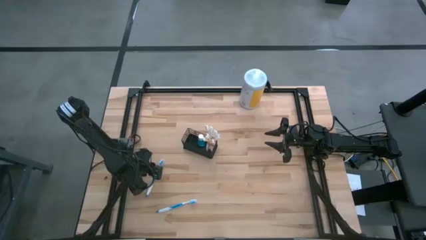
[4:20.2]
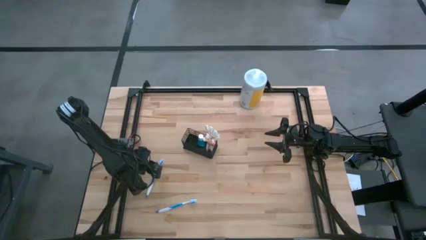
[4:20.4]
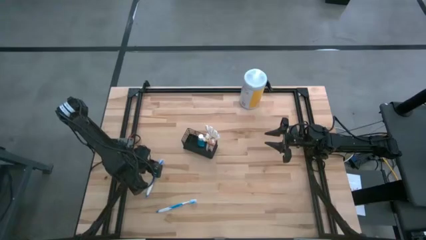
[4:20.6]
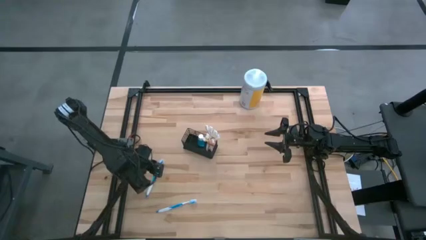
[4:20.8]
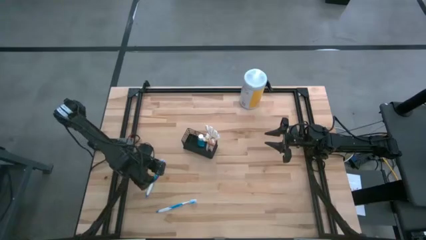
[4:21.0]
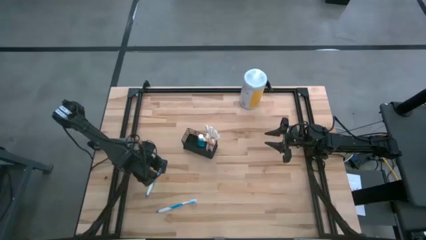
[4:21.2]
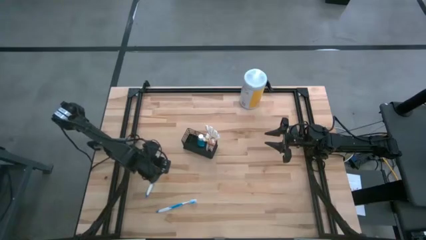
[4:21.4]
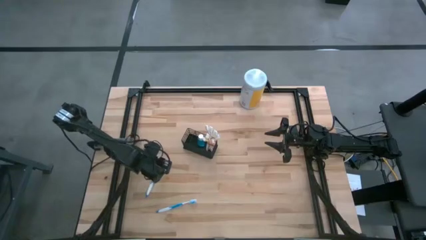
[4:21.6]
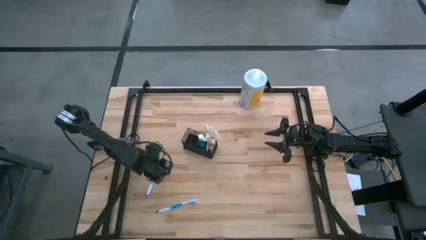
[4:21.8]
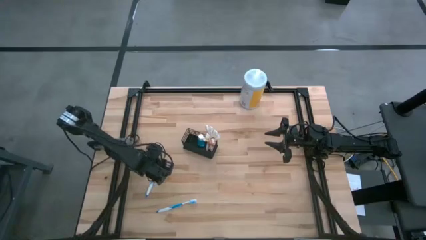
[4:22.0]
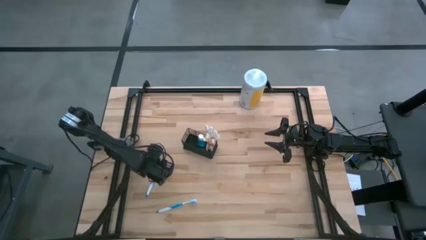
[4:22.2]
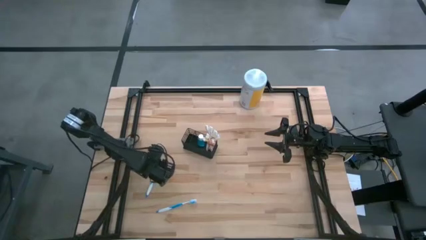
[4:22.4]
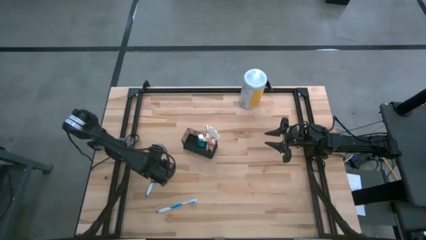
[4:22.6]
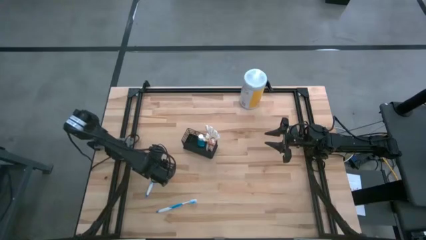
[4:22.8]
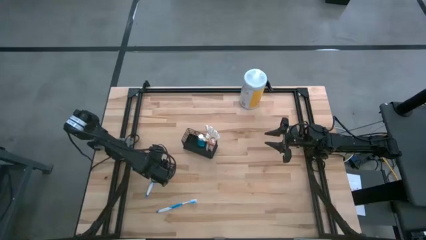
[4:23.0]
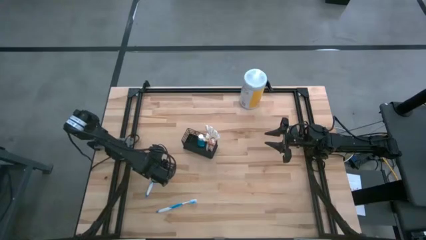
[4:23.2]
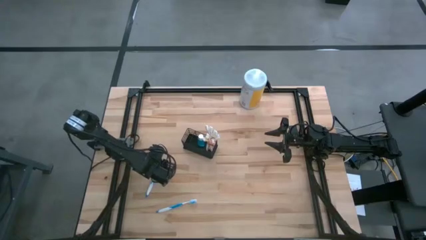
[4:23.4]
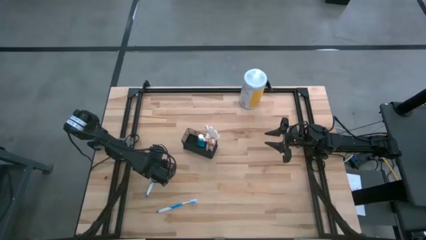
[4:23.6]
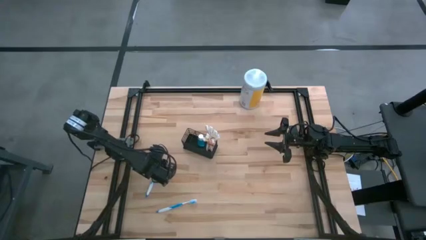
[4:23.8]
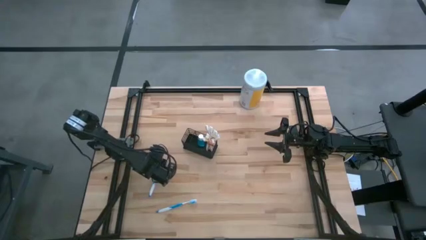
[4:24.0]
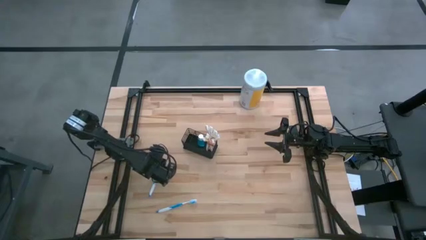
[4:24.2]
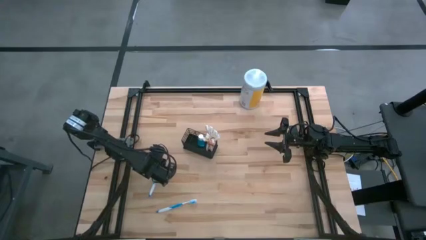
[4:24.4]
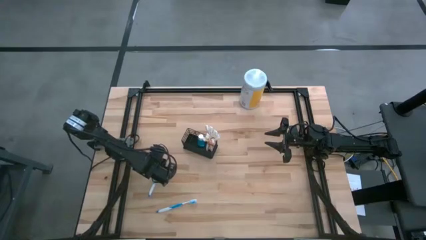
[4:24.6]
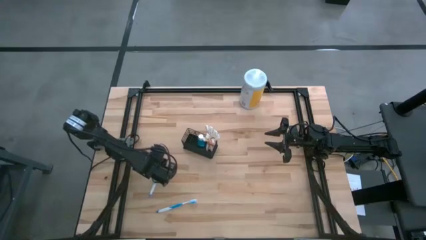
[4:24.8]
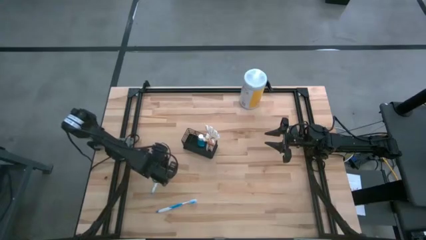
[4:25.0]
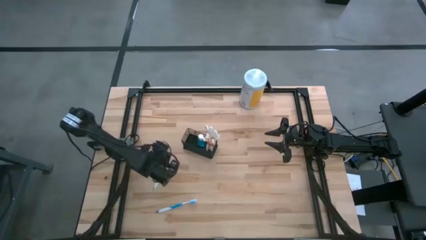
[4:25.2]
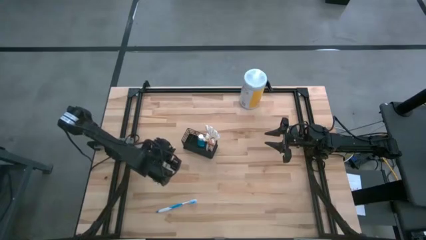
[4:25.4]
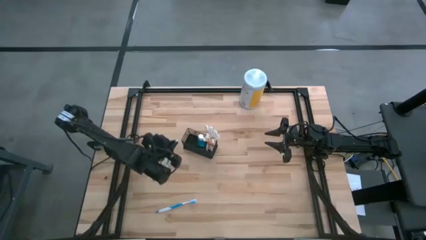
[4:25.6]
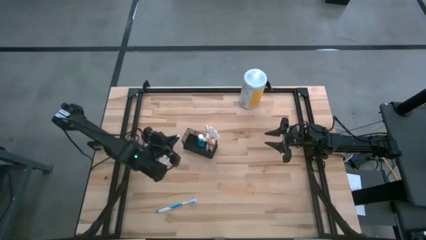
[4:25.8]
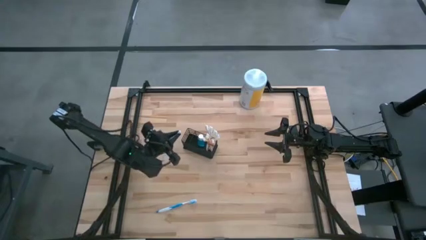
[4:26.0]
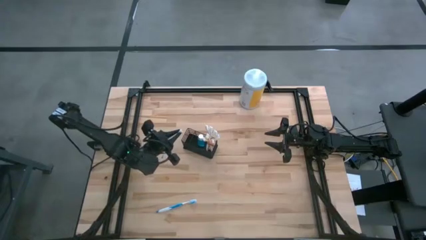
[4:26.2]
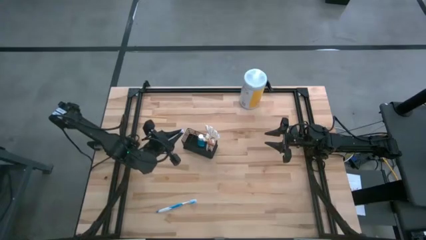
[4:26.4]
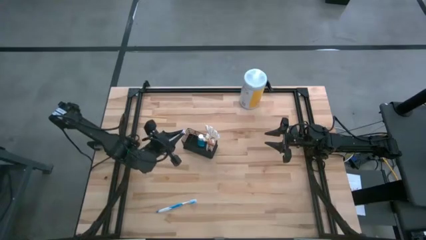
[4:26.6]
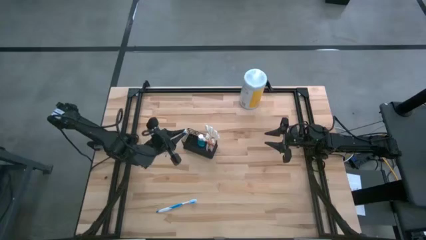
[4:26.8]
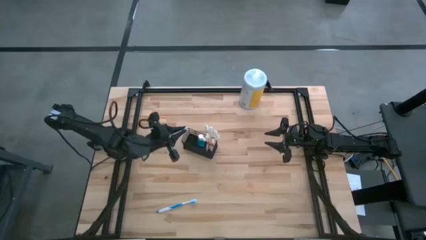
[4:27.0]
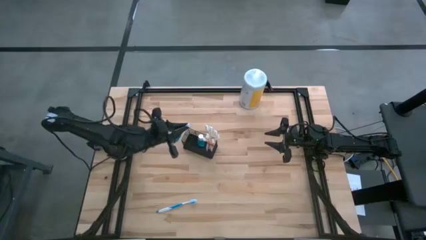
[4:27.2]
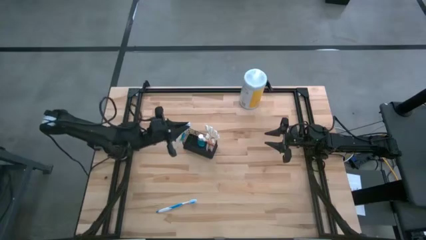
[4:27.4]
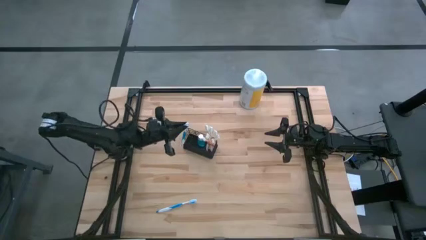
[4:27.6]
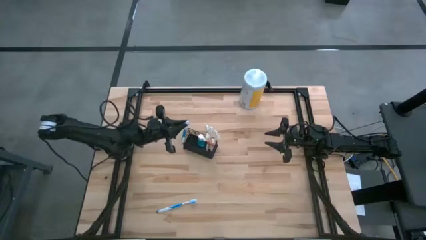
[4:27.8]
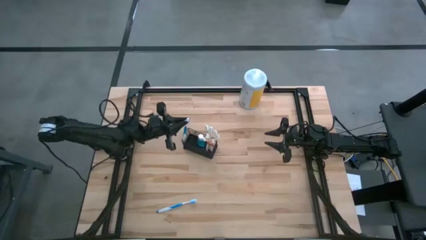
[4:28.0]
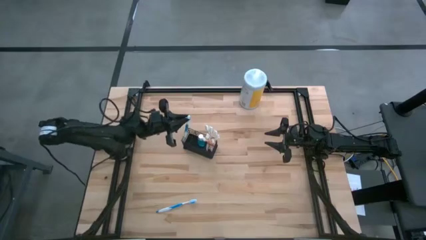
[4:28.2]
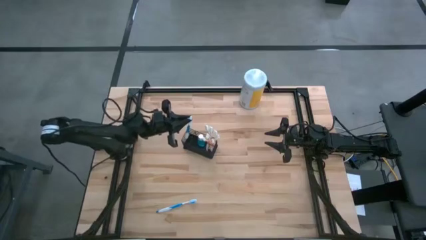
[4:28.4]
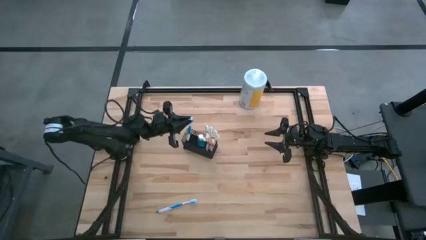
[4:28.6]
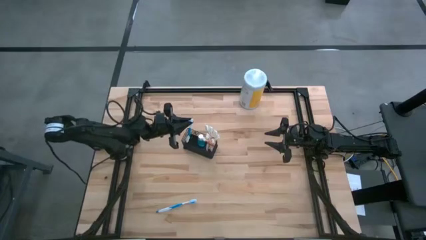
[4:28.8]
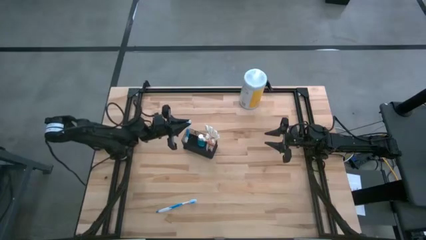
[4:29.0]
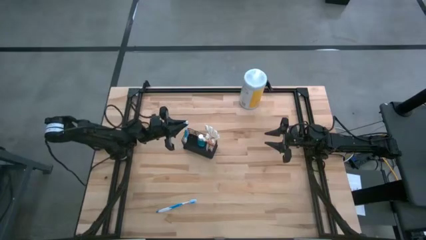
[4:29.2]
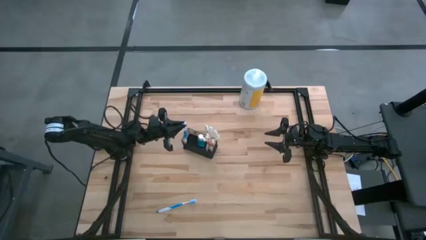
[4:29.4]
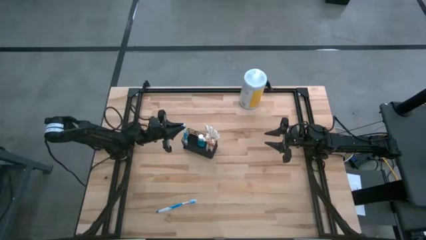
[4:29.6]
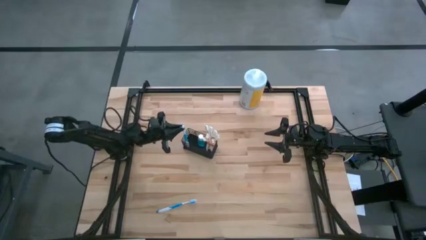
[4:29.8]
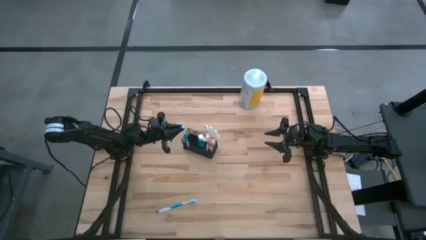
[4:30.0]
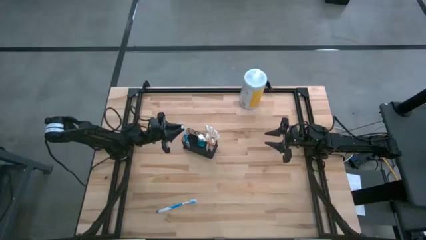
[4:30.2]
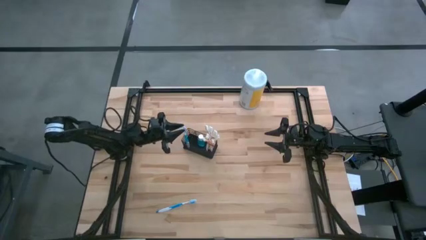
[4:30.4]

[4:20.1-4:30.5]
Task: Pick & Place toothbrushing station
Put the blue toothbrush into the left section of the wire organizer

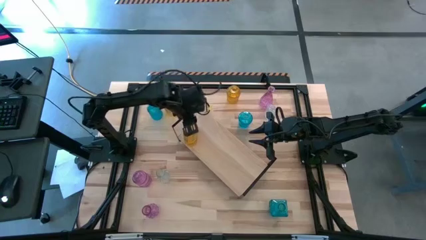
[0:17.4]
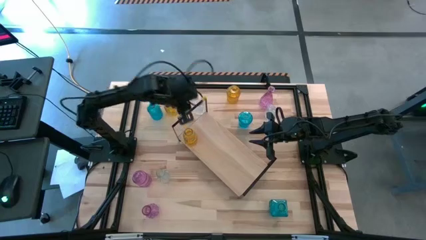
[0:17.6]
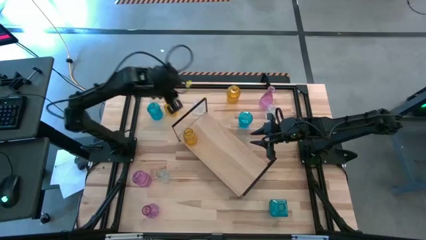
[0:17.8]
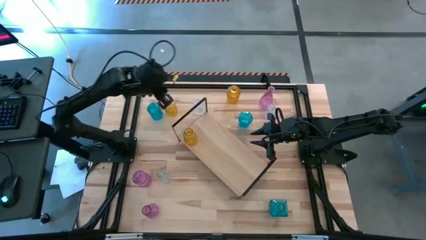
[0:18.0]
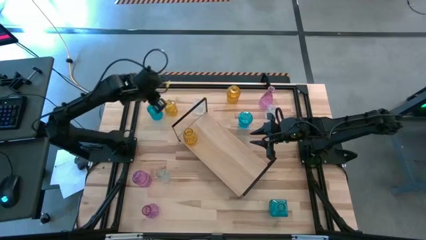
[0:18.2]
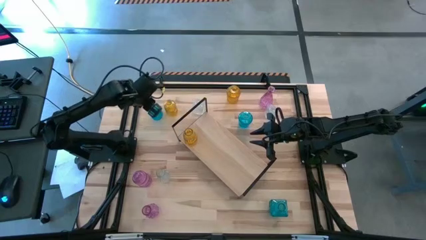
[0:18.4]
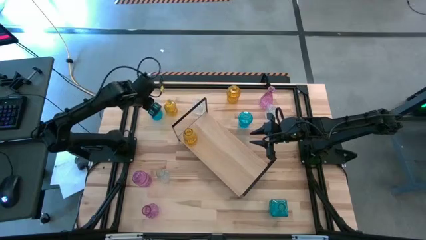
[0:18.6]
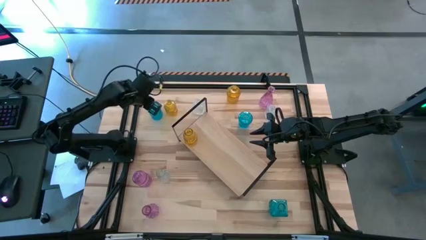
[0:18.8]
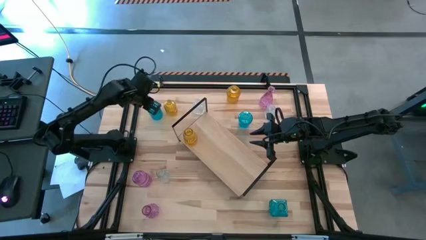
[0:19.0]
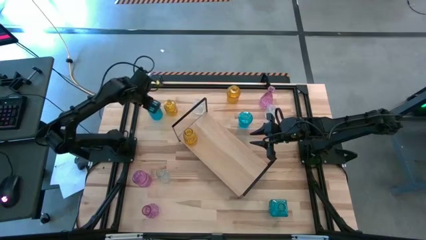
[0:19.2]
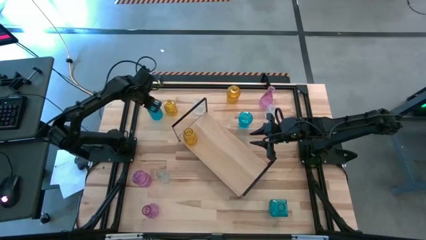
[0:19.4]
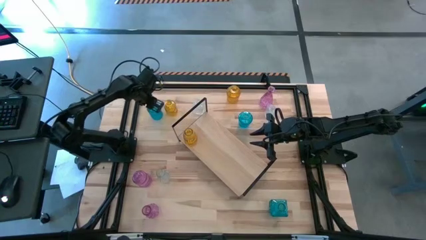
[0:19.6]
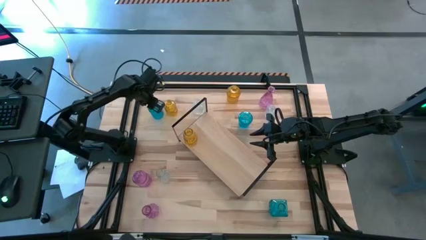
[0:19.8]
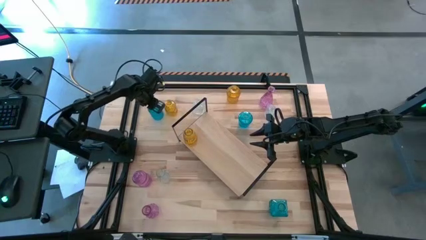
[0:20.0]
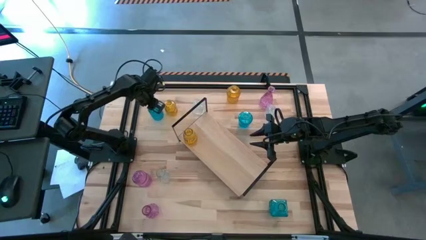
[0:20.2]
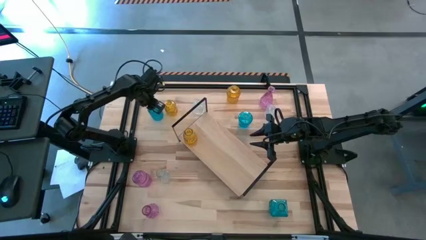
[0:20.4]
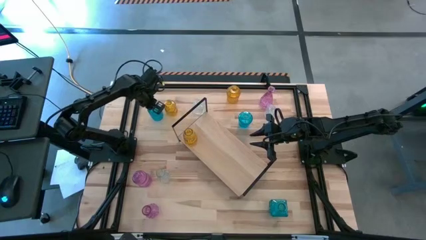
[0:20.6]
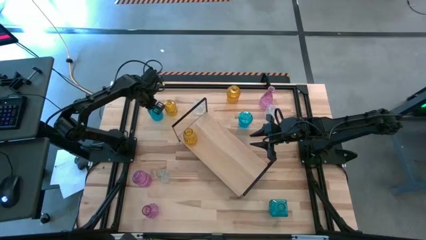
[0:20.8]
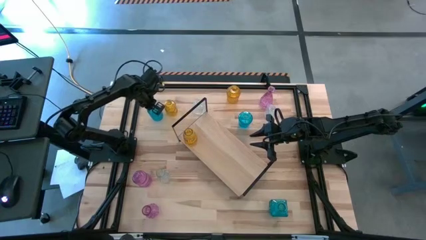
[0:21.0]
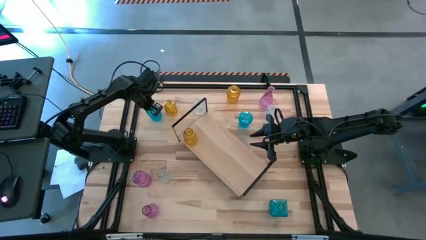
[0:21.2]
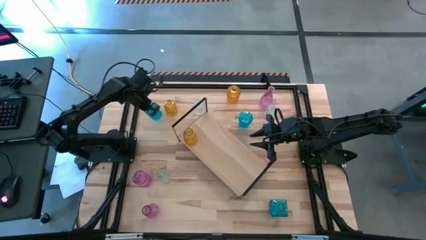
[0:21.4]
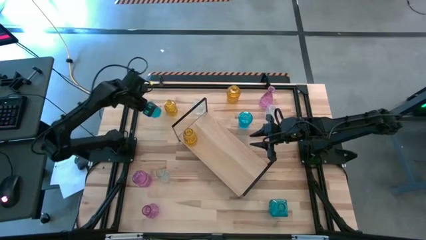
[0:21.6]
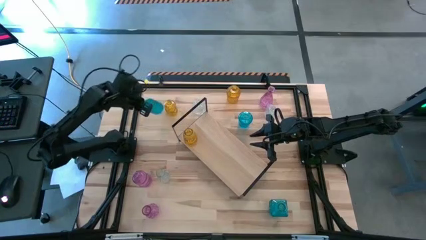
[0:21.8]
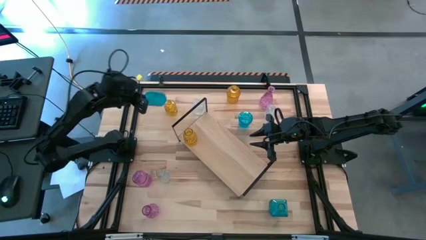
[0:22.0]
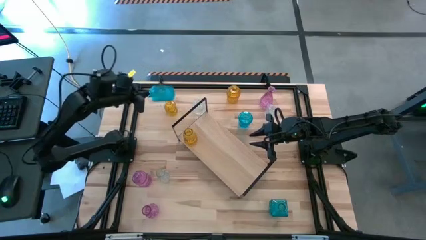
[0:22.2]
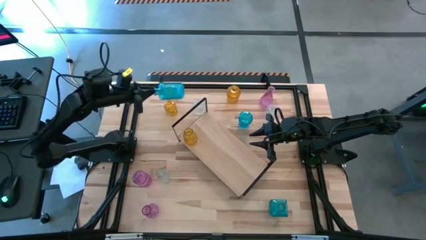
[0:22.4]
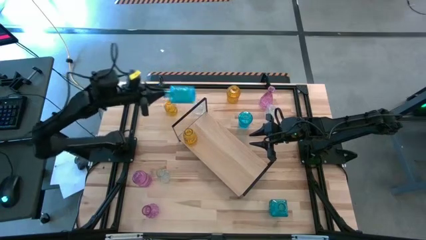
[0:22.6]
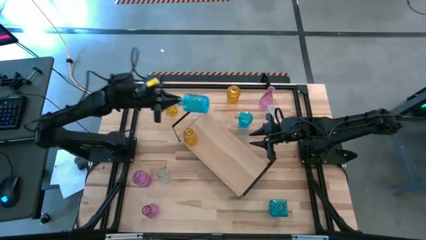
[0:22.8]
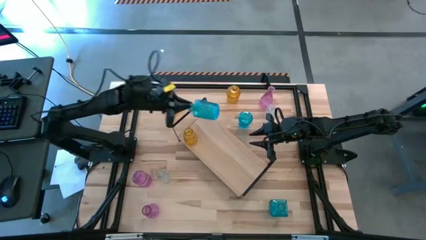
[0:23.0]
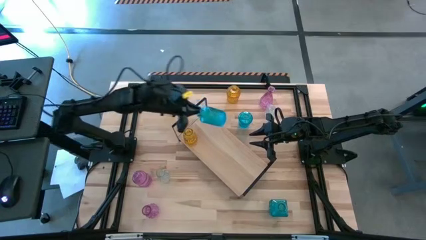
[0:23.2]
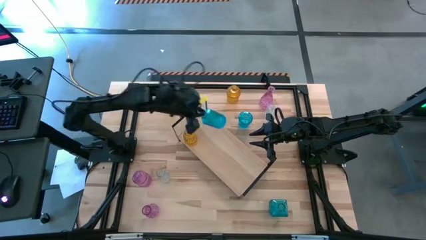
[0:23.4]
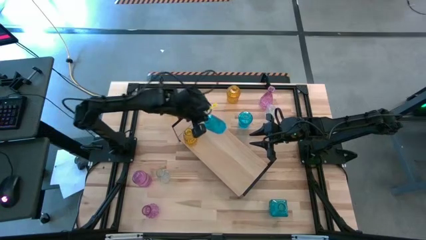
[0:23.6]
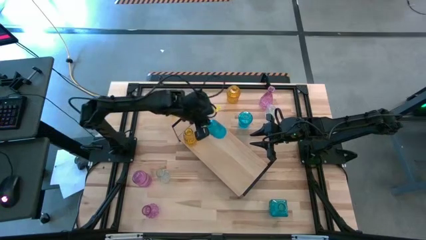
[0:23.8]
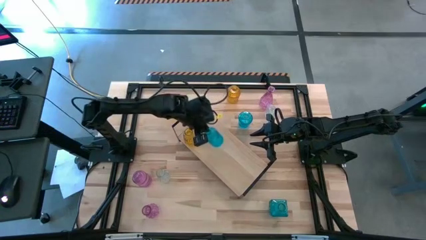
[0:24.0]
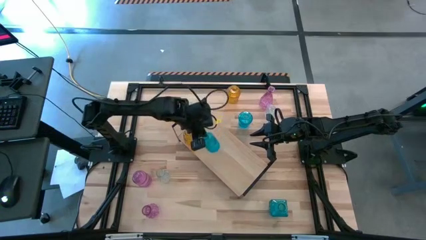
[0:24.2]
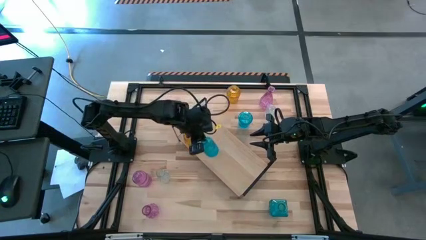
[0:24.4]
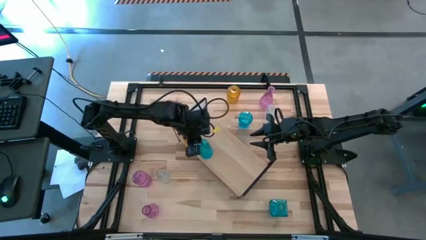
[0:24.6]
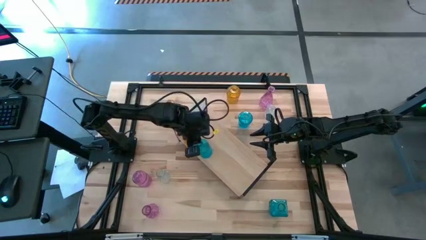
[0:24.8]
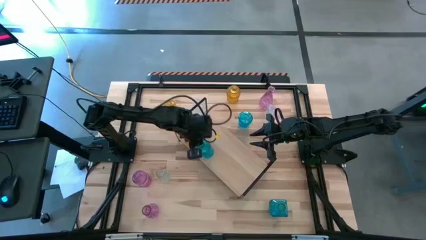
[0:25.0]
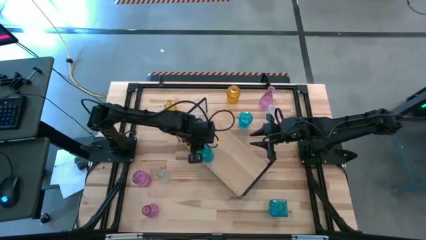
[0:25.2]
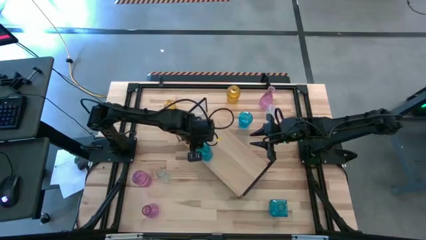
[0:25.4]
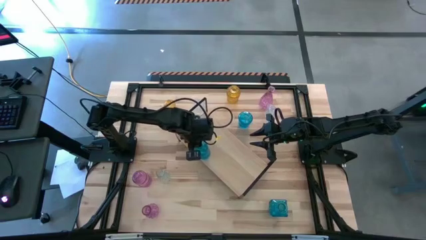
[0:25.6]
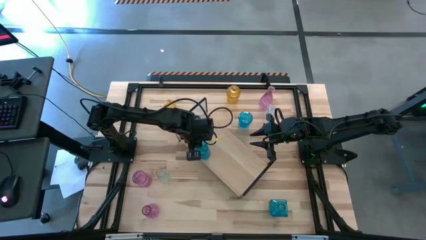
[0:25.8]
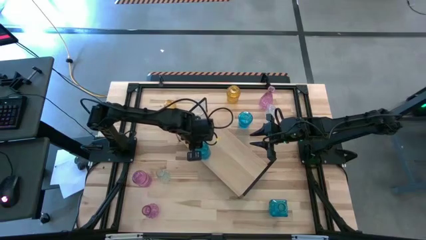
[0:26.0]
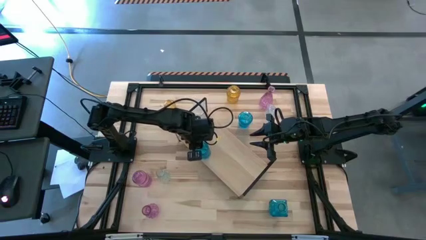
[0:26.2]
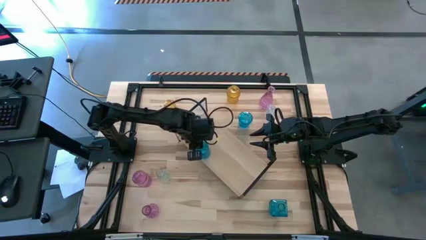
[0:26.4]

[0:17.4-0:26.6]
Task: sort vases onto shelf
Put the top left blue crystal vase on the shelf
